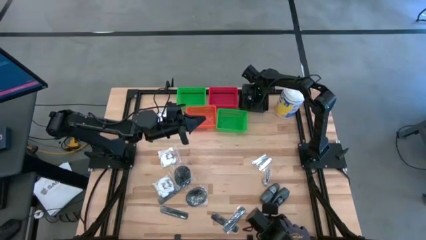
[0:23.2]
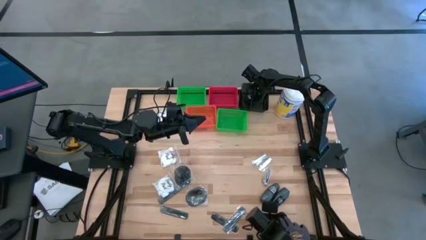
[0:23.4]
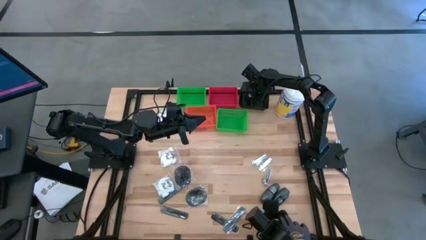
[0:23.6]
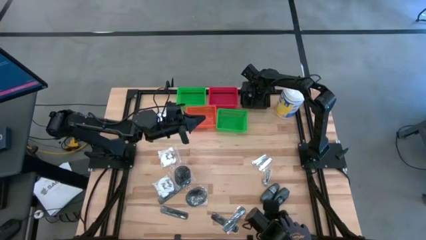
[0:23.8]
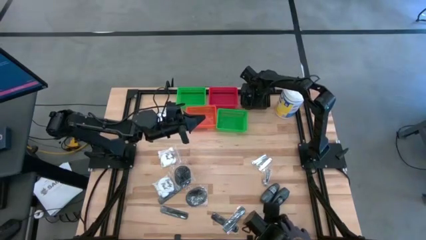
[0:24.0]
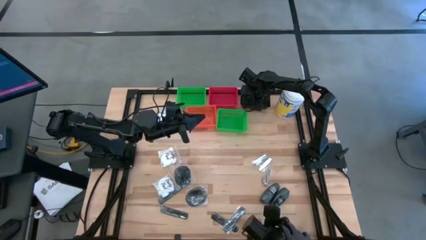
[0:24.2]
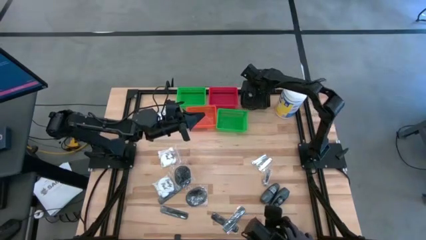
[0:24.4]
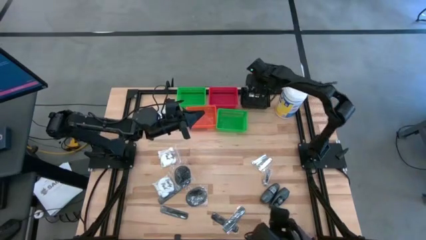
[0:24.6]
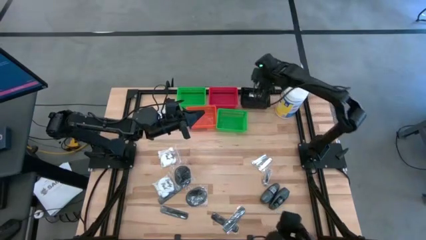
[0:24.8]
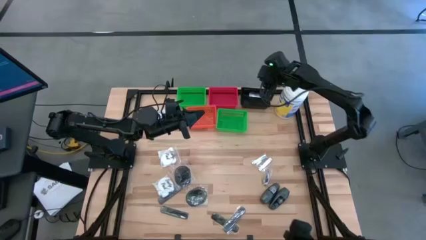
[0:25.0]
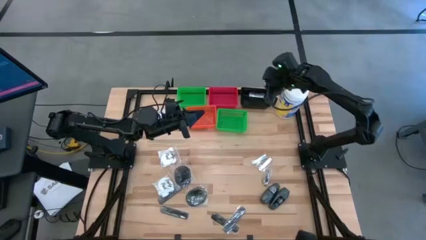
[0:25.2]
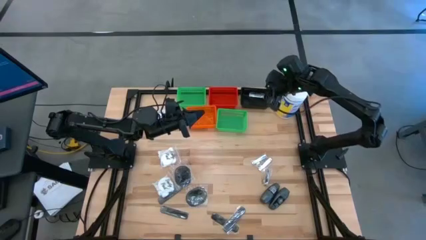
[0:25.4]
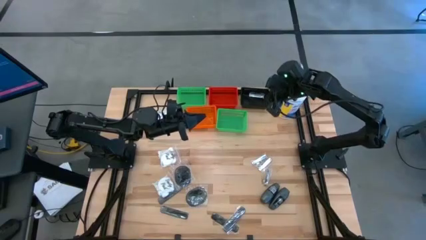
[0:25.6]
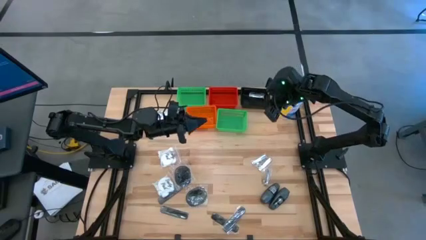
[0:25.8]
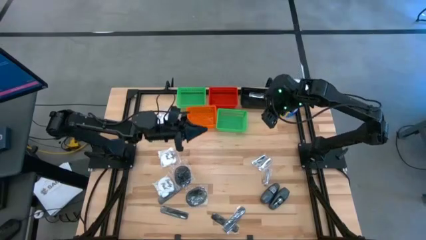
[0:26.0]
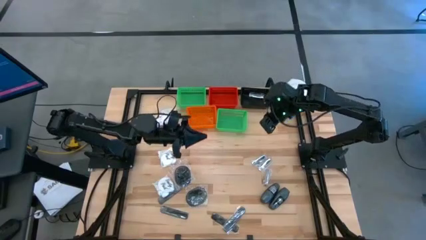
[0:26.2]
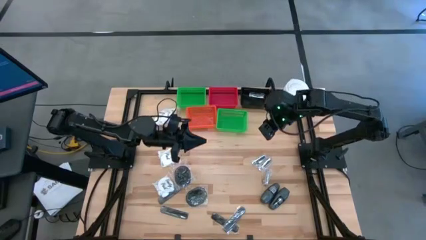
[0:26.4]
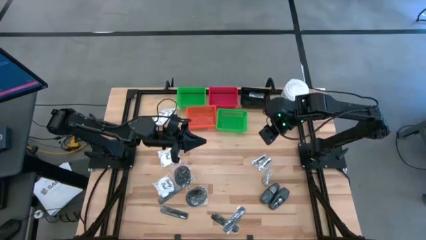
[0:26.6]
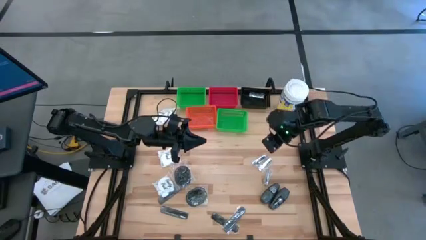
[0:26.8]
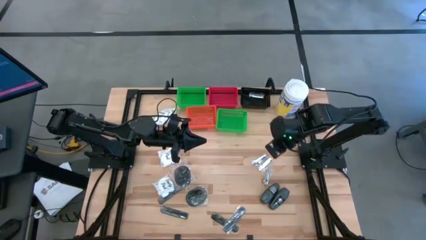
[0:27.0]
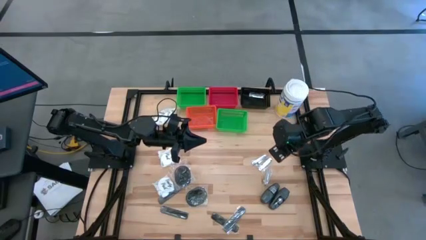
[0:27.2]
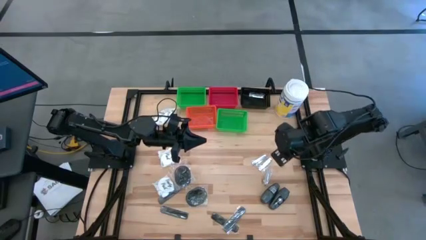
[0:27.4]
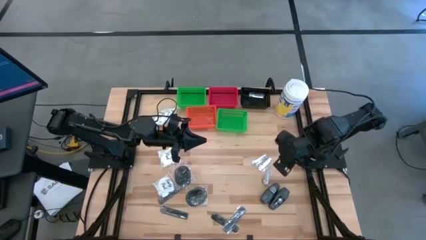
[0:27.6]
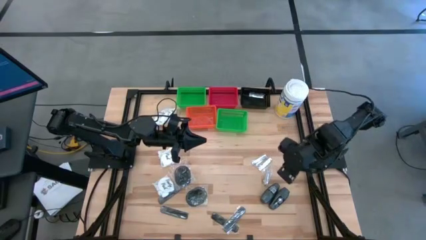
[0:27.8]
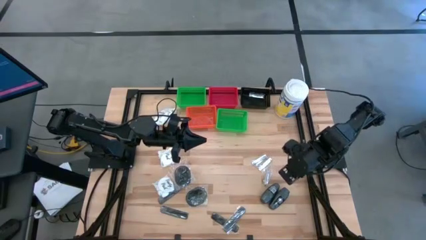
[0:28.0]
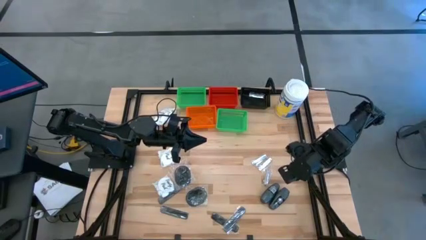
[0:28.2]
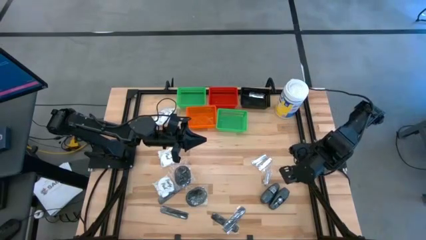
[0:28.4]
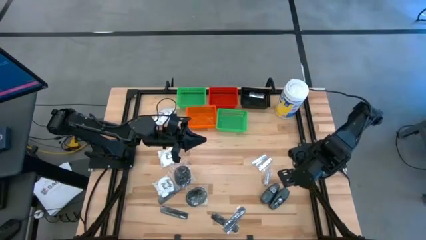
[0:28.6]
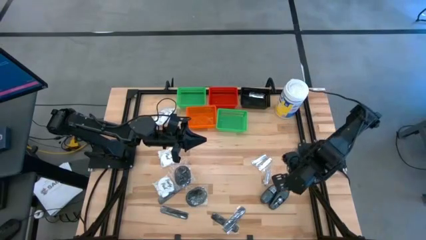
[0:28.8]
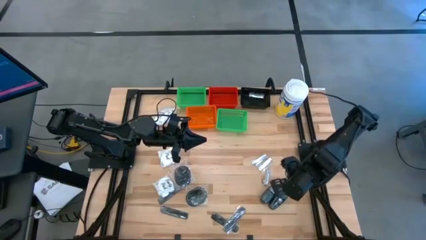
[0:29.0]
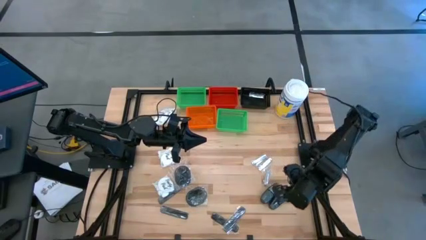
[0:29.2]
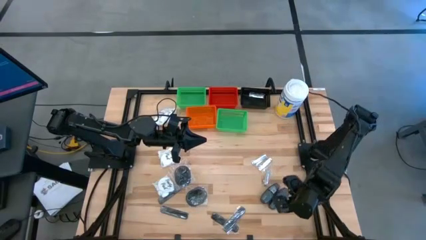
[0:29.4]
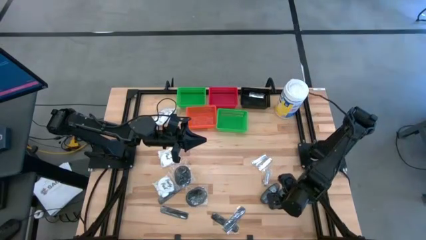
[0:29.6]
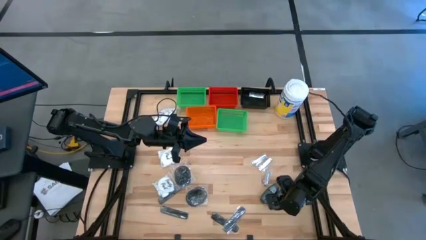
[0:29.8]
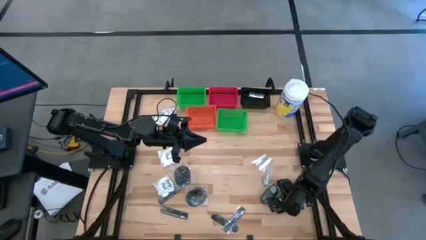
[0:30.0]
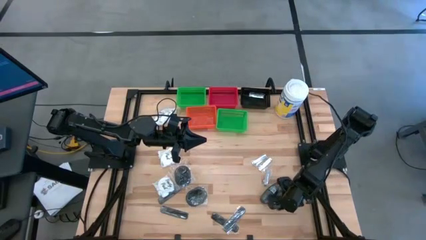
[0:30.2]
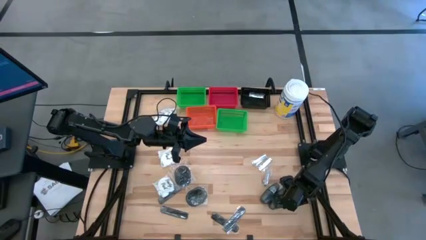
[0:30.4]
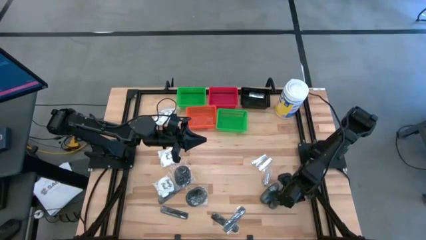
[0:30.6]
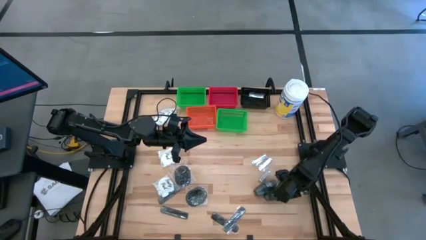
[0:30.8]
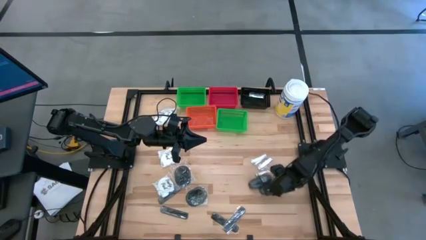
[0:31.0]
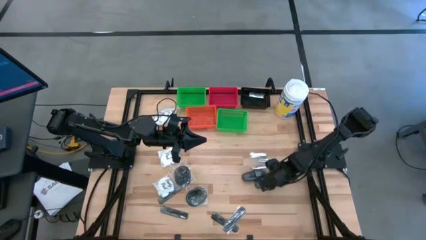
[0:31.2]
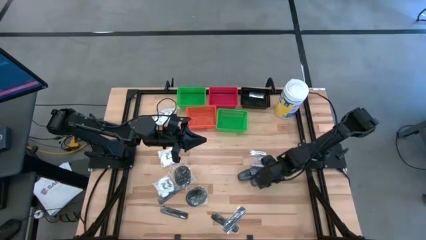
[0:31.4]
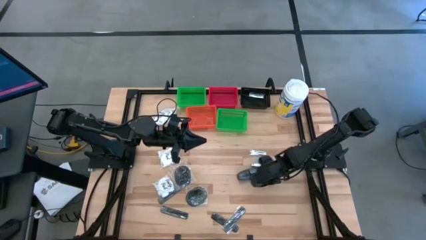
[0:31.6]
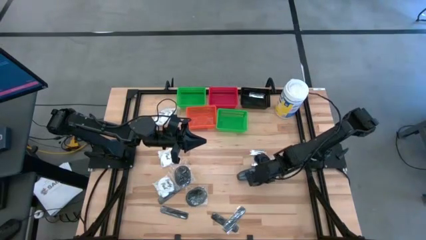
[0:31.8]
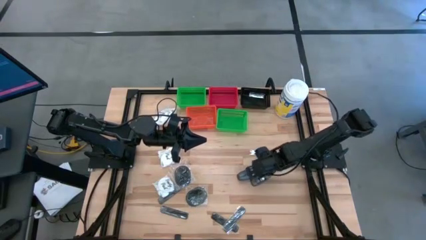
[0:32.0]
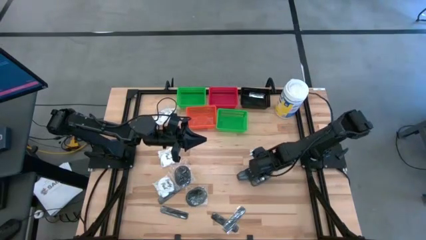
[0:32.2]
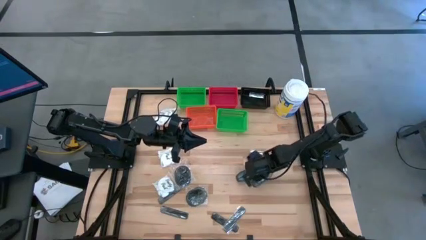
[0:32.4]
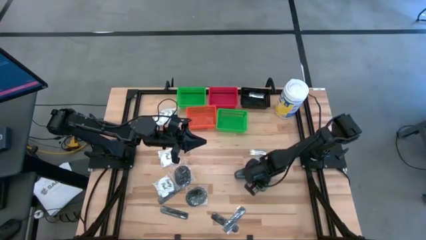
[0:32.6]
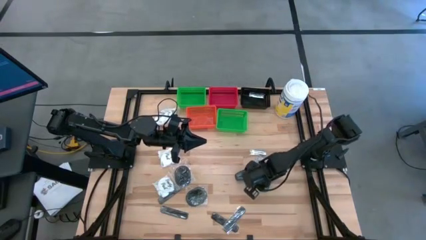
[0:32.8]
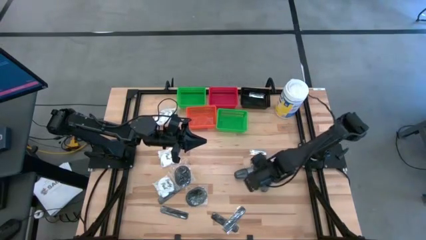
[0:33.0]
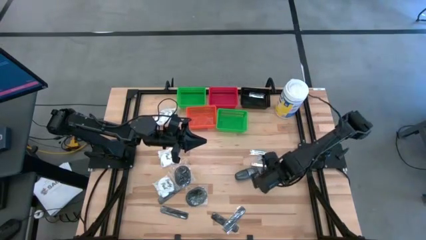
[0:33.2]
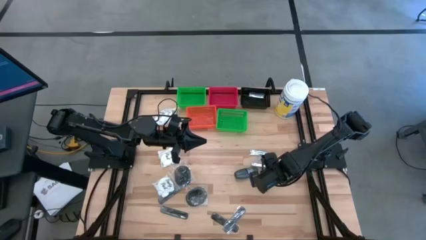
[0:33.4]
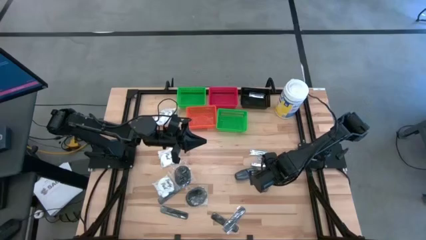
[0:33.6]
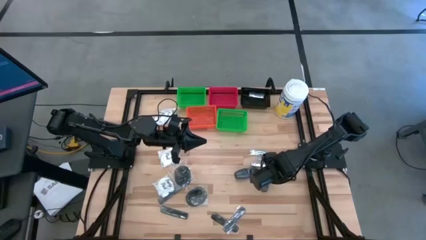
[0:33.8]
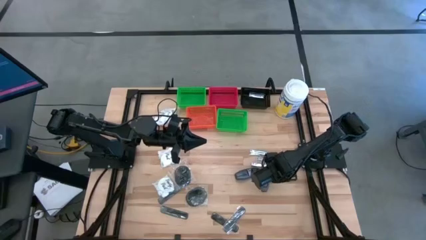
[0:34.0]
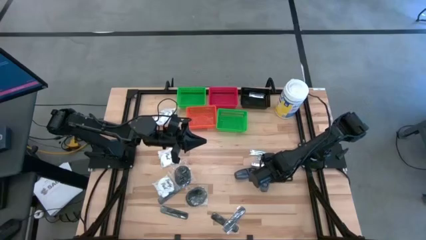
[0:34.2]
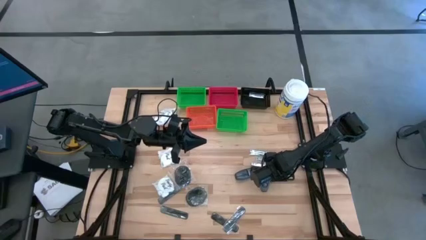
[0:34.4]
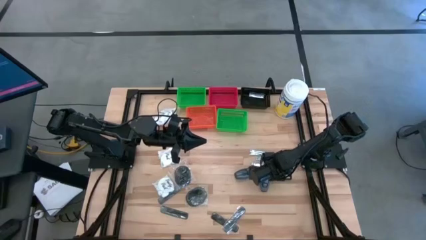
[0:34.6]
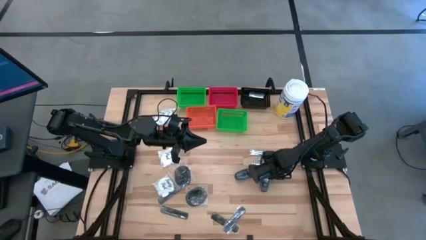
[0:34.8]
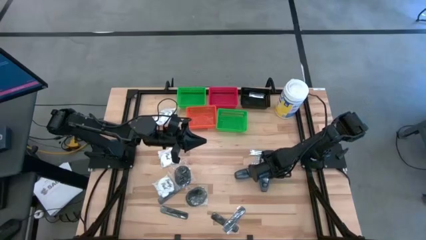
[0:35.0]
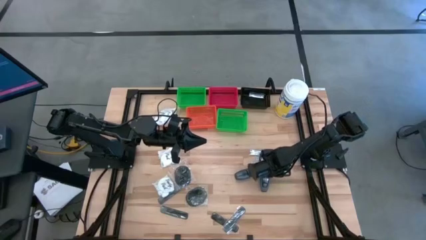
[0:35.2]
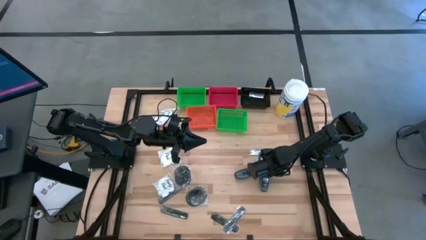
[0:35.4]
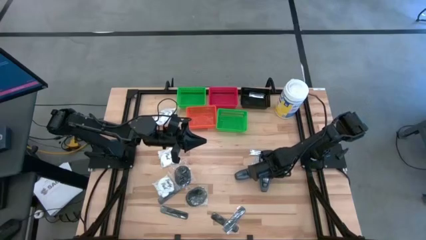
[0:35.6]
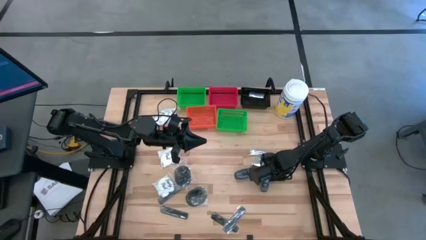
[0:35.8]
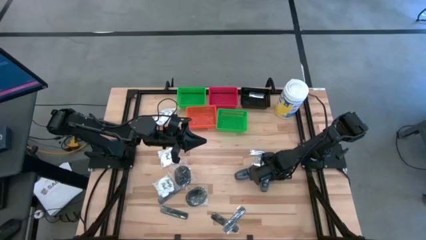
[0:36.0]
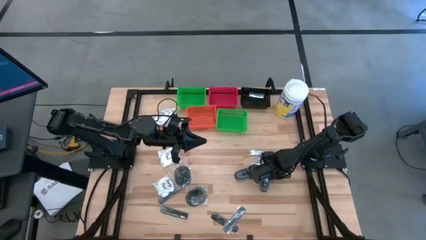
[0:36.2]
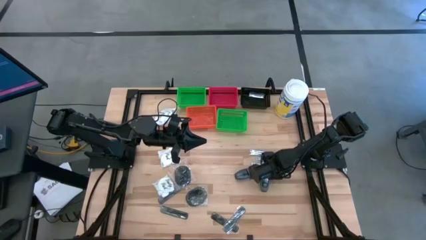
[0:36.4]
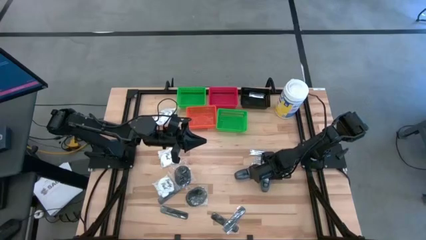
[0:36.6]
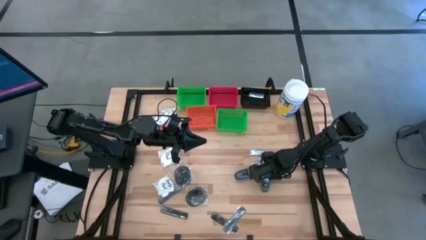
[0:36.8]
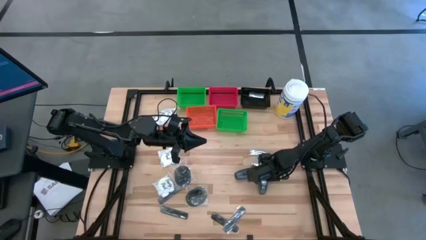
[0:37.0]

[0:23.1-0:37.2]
Task: Pick & Place Travel size toiletries
Put the black deodorant into the green bin

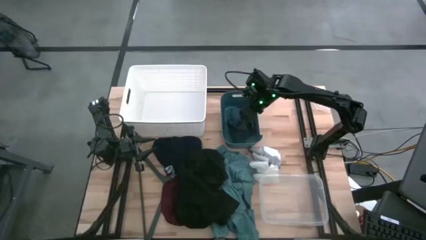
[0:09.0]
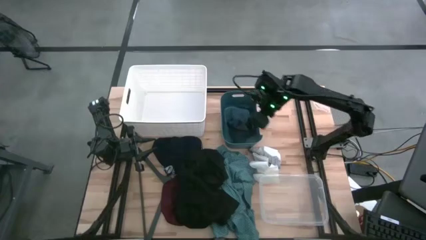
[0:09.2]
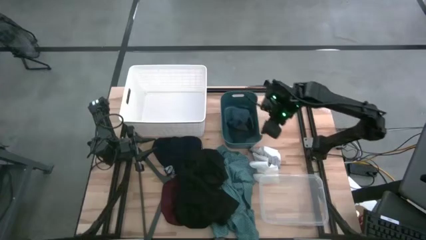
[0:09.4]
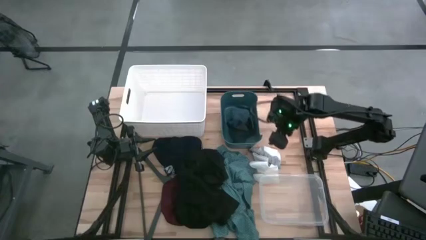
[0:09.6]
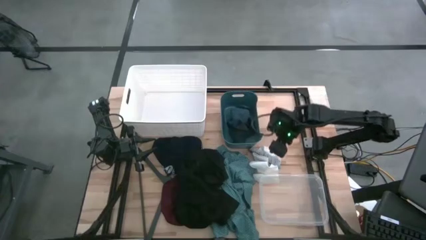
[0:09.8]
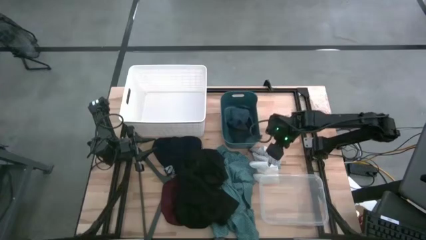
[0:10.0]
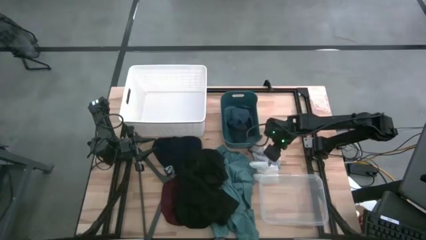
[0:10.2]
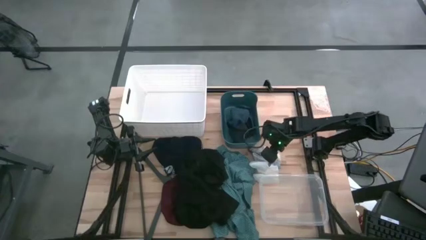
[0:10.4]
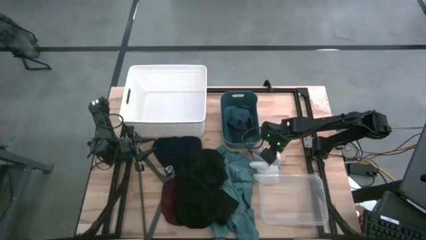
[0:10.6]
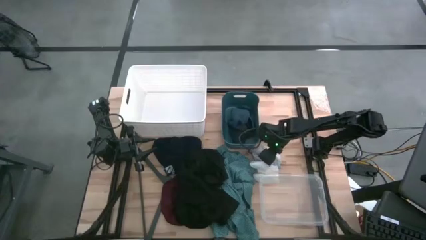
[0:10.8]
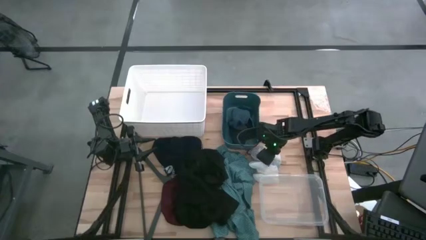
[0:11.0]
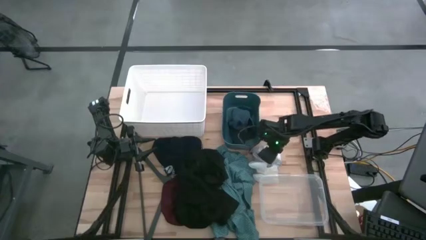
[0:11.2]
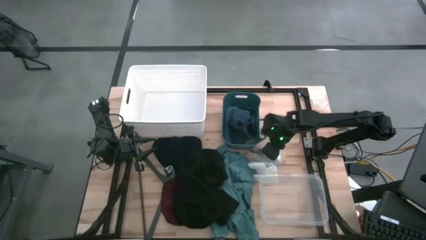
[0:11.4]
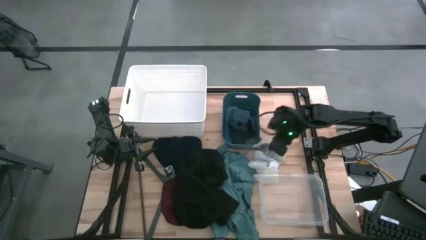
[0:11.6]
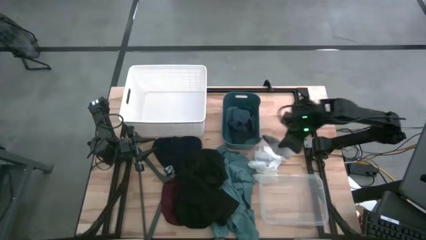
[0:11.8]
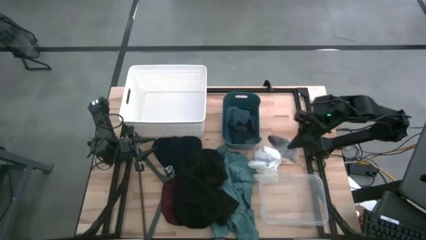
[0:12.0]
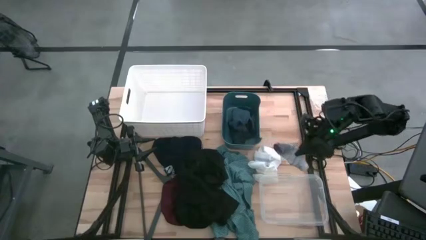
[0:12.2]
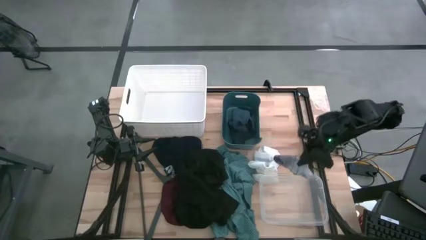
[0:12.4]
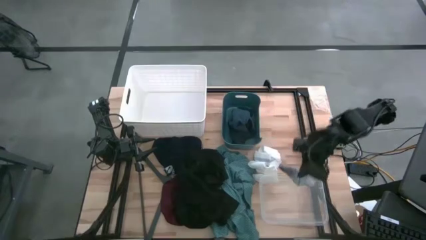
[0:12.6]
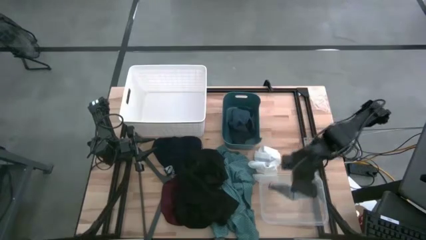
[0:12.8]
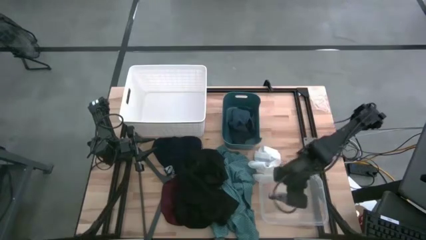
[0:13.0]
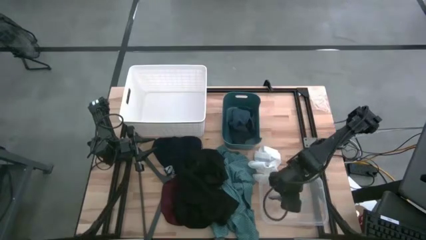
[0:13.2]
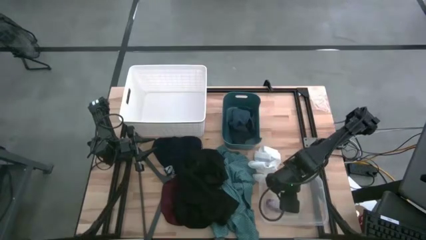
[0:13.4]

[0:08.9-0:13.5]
Task: Pick & Place Cloths
Put the gray socks into the transparent bin
